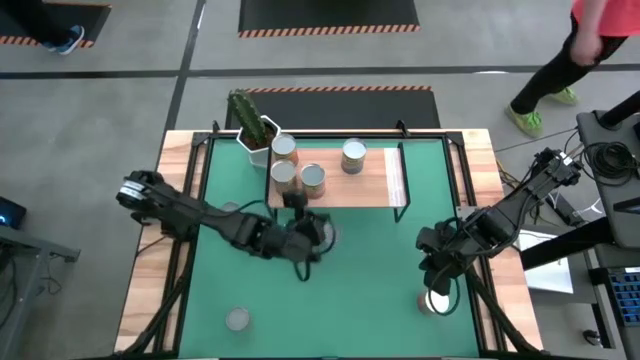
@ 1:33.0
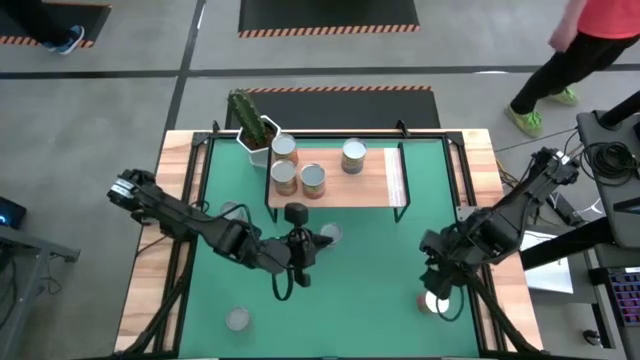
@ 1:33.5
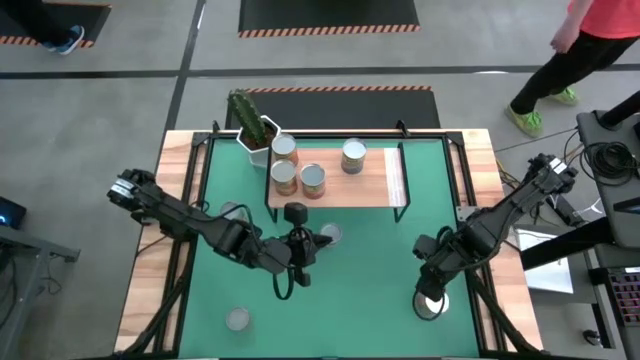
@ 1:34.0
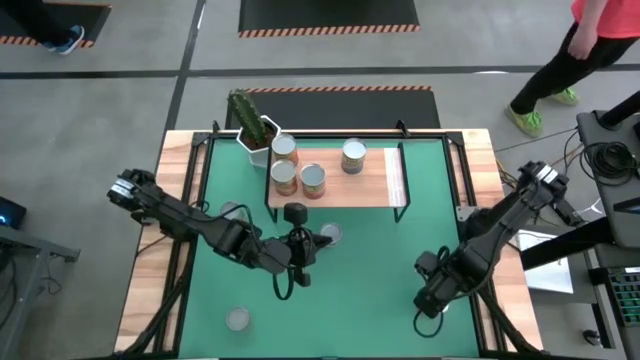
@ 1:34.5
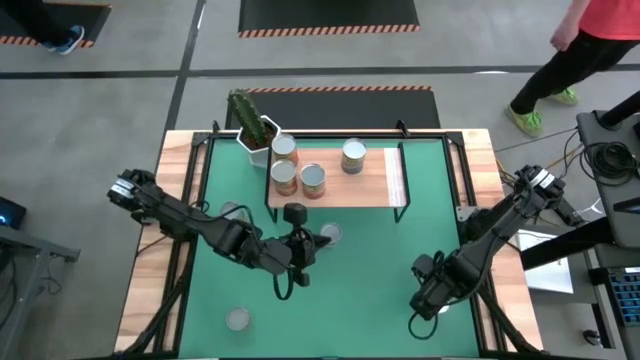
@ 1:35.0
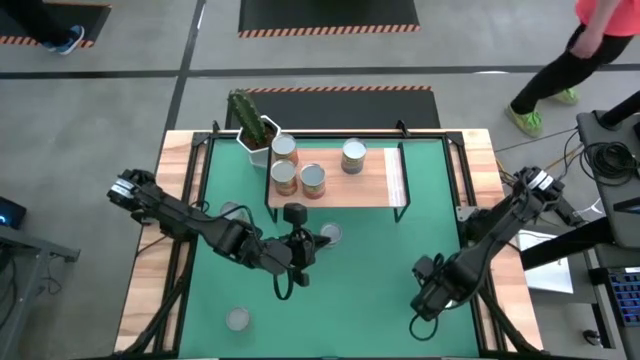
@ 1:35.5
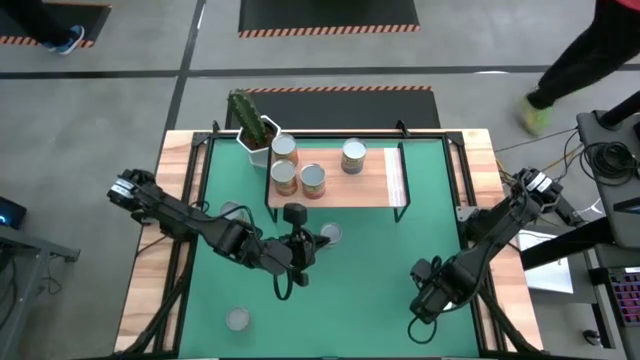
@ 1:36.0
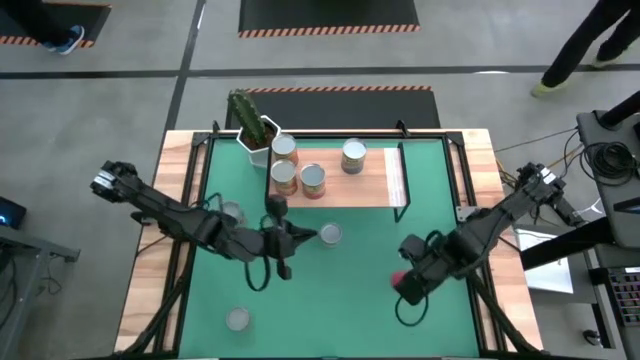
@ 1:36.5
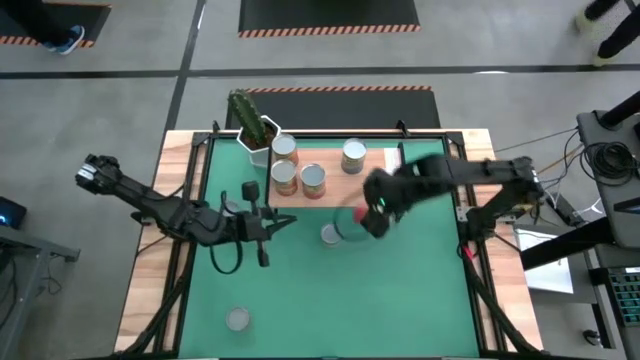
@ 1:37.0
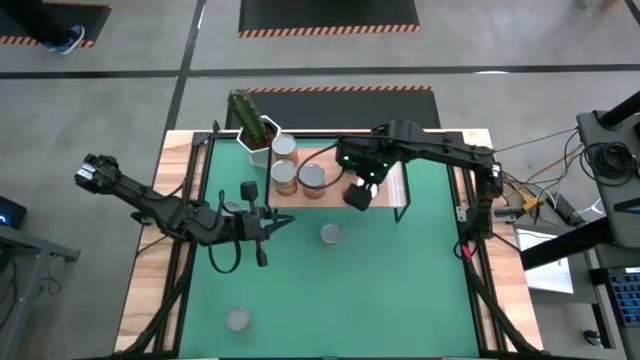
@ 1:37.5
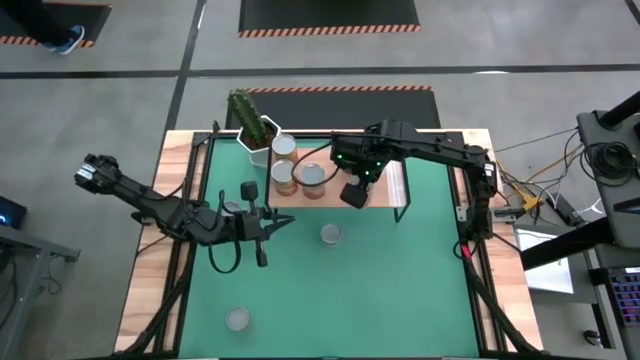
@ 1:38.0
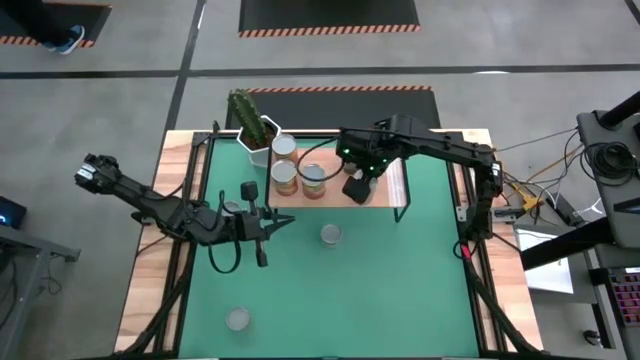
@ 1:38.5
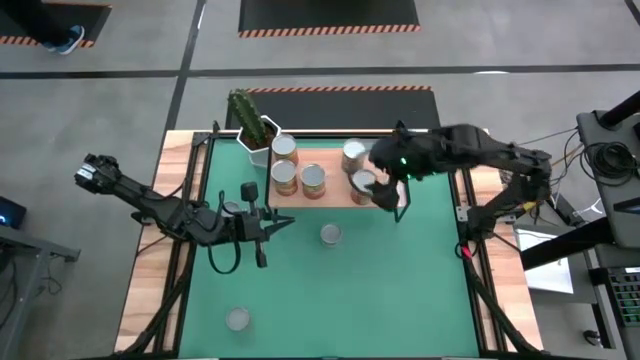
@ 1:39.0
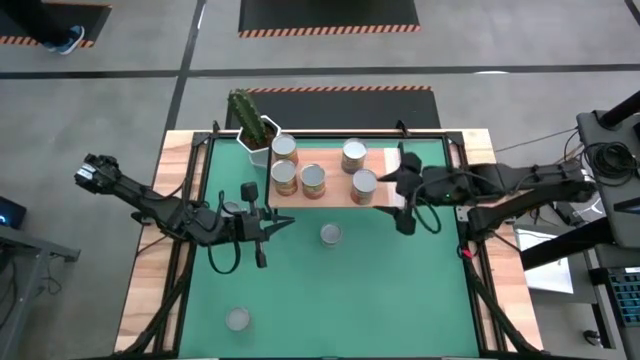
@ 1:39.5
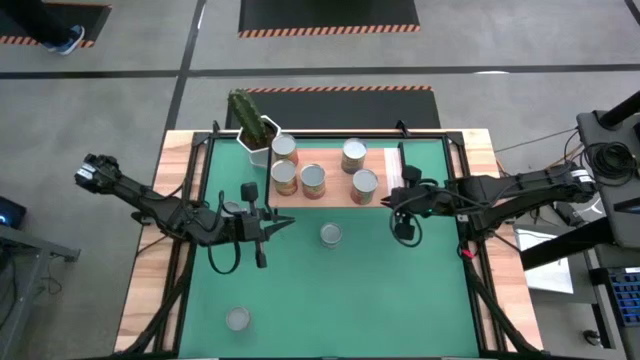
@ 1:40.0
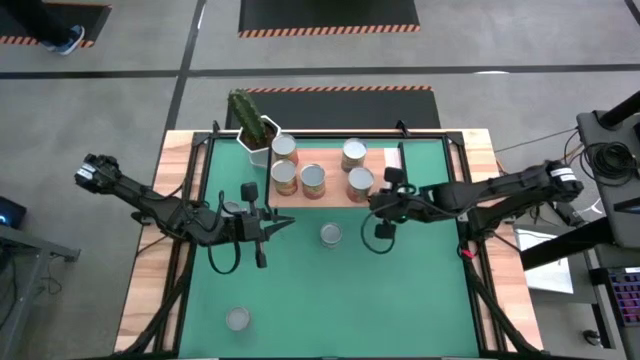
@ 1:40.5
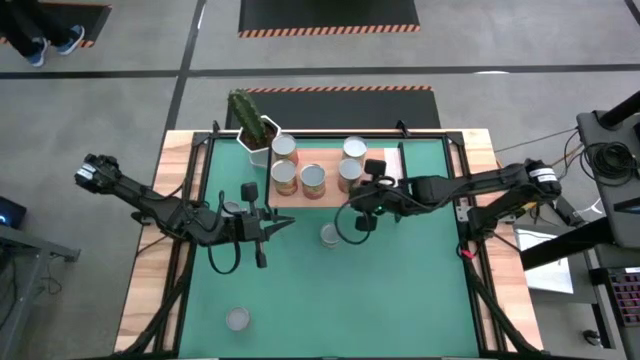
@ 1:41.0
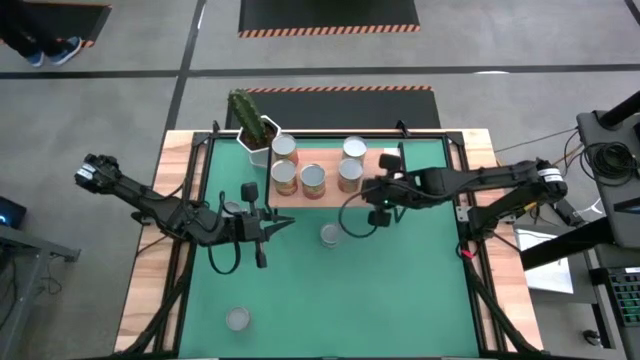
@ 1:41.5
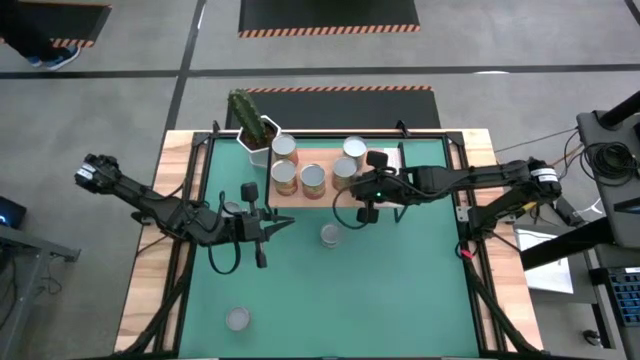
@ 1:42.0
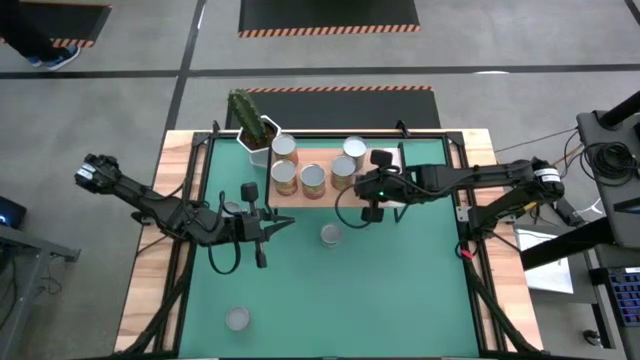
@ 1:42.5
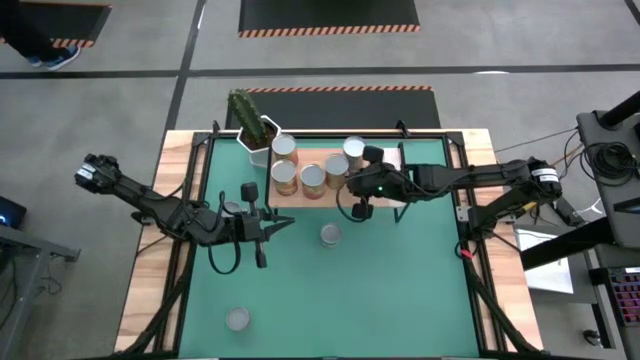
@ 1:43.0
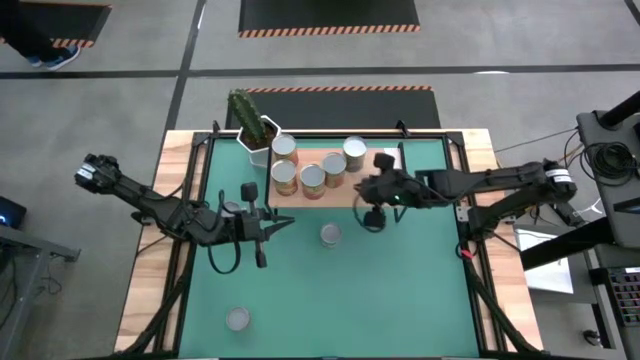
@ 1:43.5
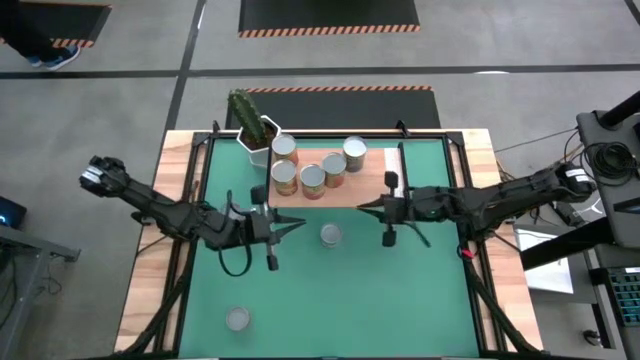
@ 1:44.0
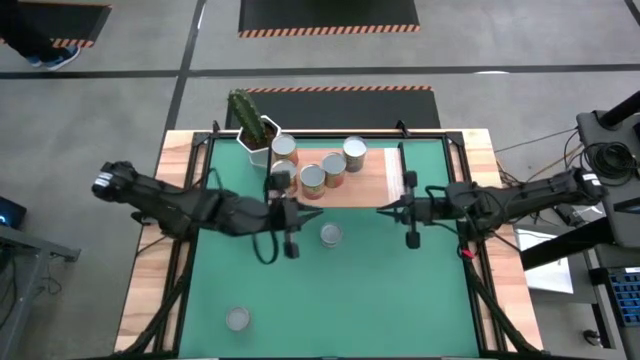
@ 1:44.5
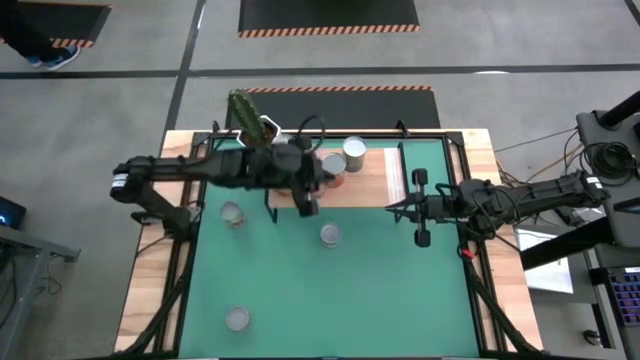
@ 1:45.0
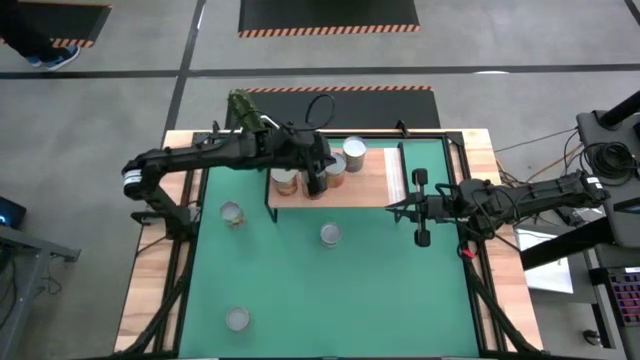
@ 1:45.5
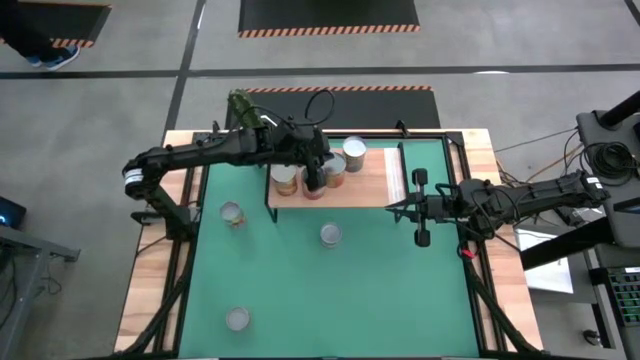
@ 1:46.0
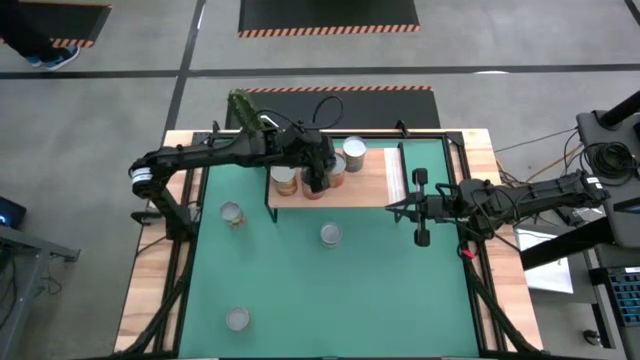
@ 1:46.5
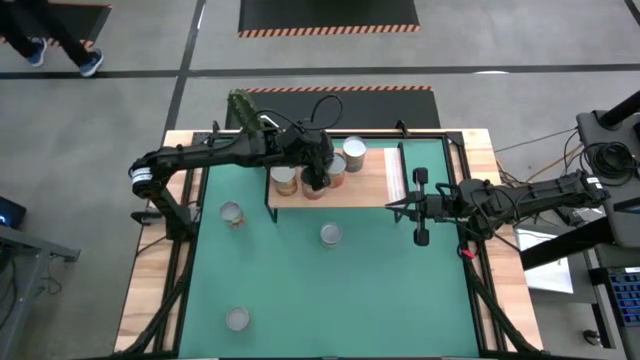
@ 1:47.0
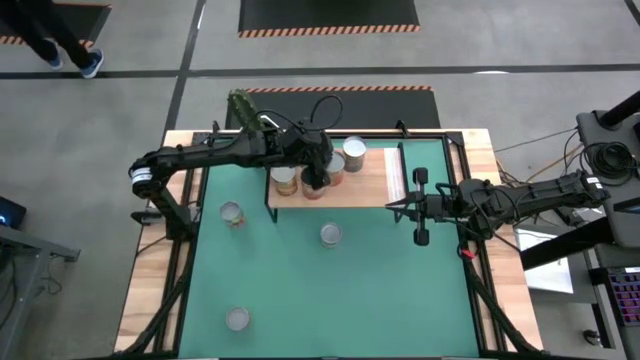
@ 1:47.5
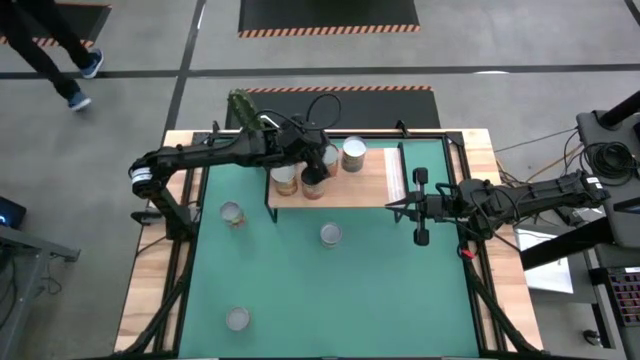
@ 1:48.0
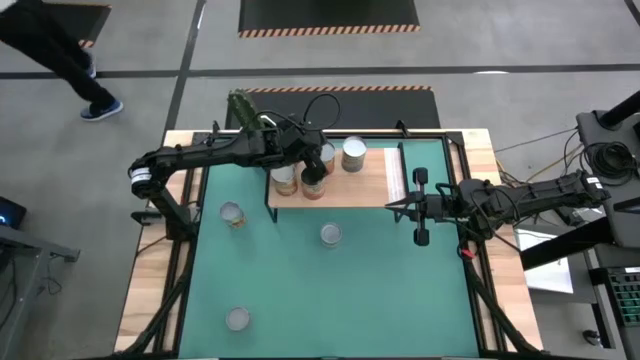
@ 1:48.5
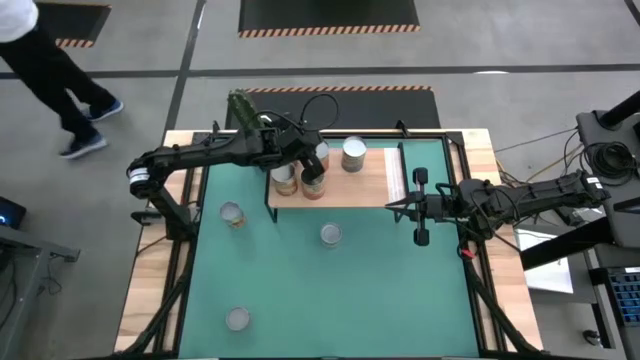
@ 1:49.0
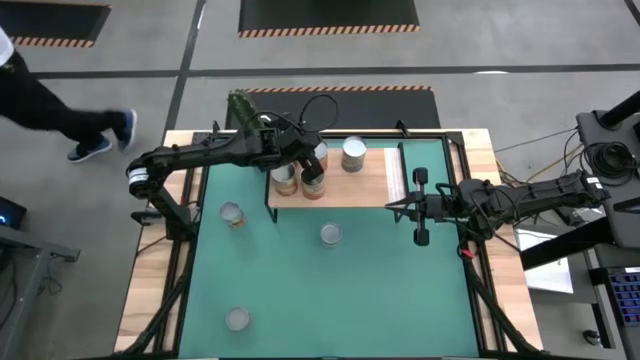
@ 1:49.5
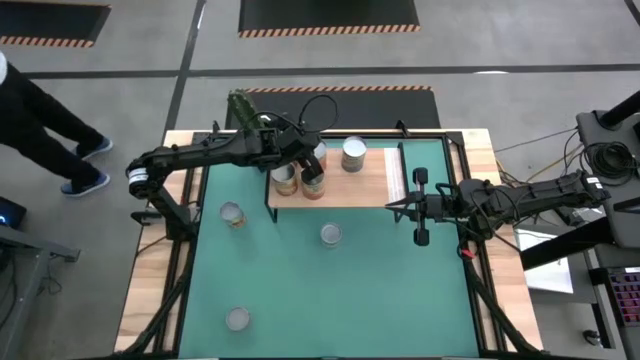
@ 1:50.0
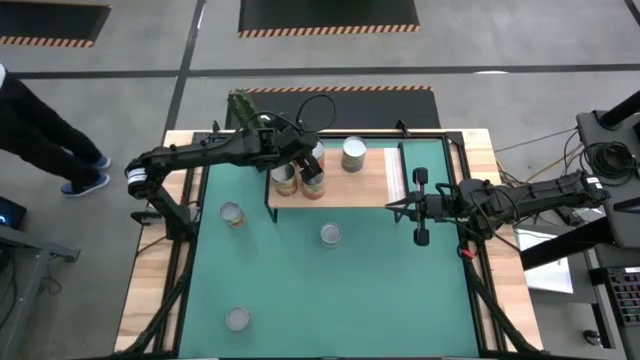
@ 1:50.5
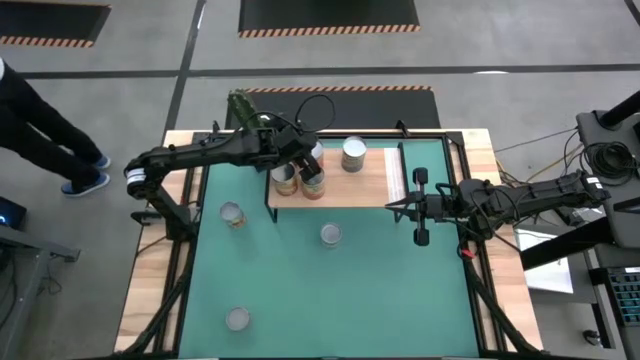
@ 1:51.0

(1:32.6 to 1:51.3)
Task: Pick and place cans onto a shelf
Put the canned pineapple on the shelf

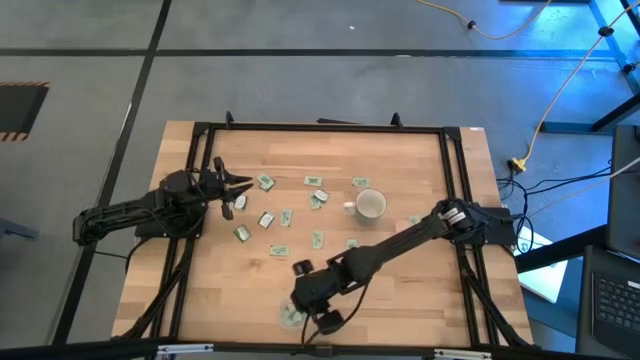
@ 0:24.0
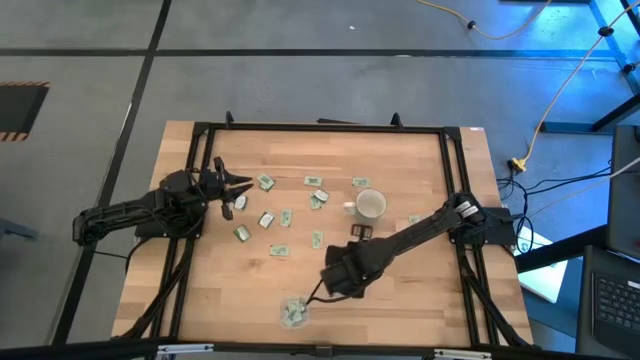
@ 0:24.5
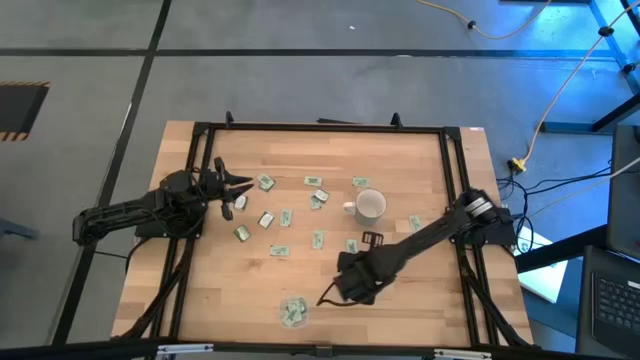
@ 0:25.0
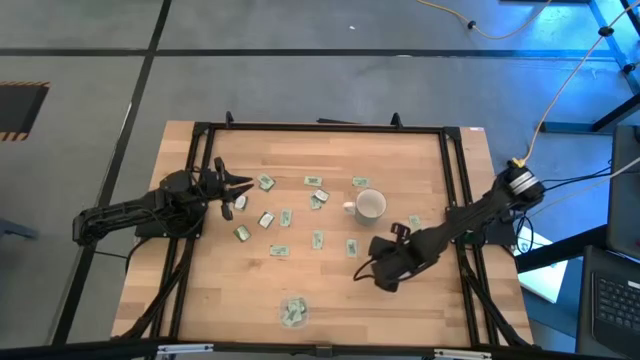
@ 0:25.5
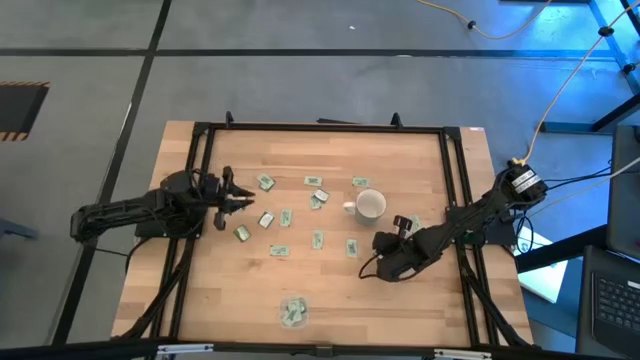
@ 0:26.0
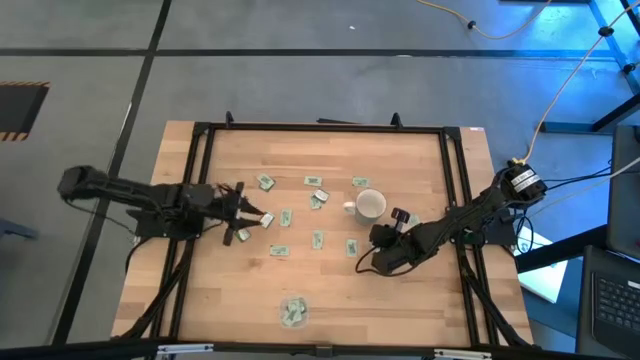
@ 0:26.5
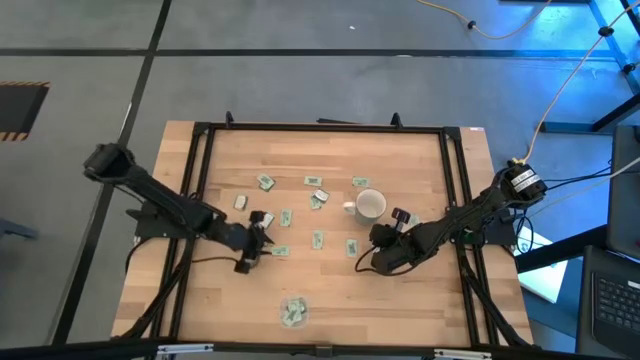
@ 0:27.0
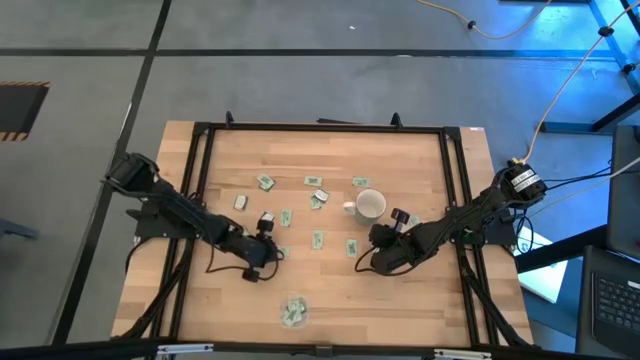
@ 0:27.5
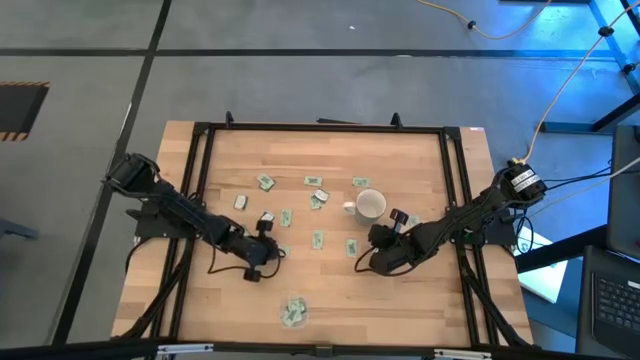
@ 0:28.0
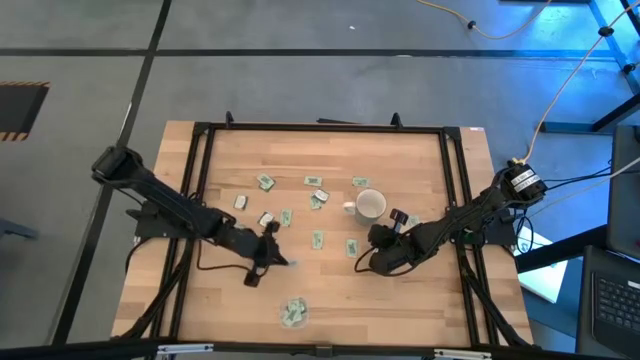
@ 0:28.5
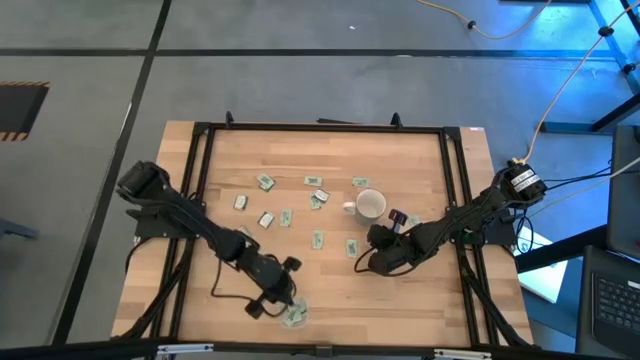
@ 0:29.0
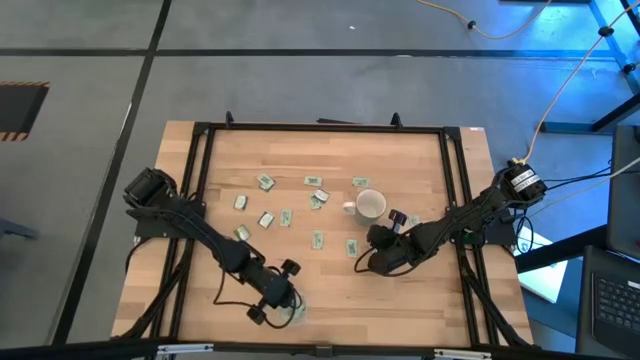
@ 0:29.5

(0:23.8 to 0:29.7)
Task: Pick and place Stevia / Truvia into bins
Put the light green stevia packet into the transparent bin
